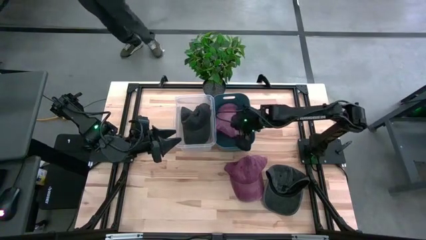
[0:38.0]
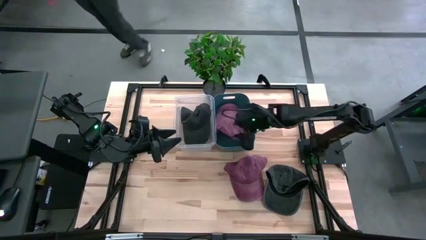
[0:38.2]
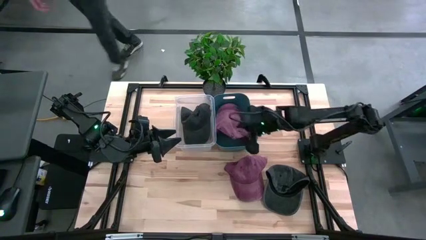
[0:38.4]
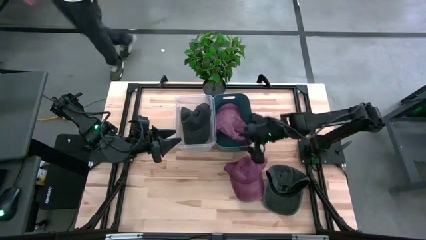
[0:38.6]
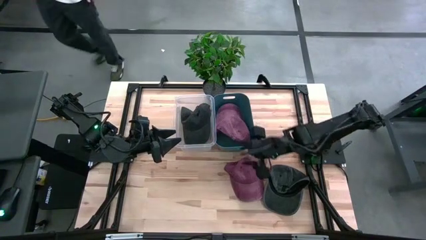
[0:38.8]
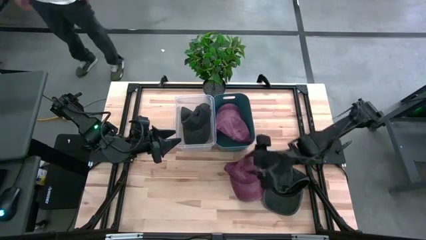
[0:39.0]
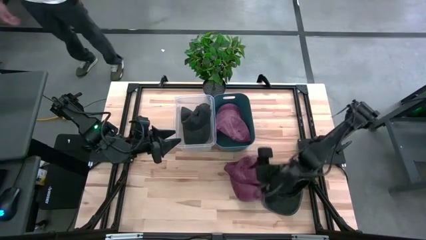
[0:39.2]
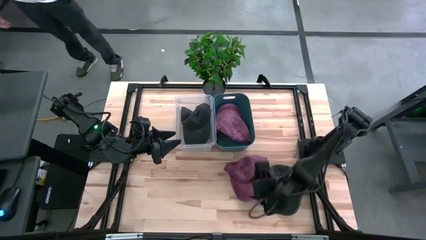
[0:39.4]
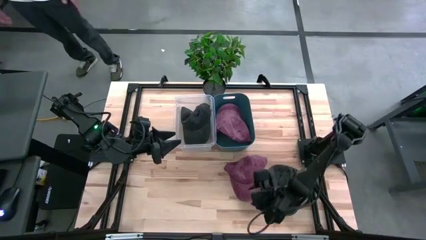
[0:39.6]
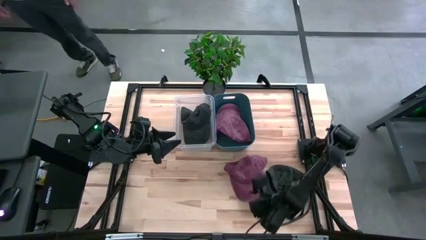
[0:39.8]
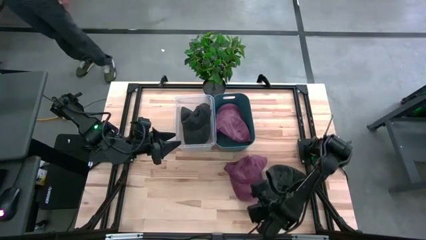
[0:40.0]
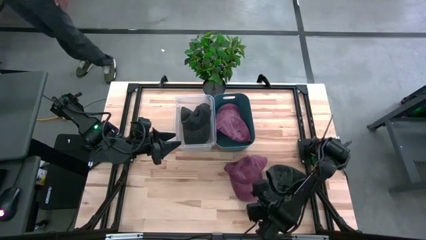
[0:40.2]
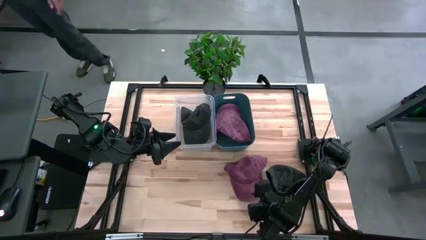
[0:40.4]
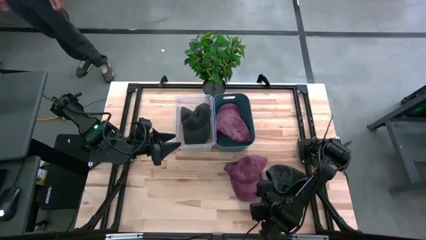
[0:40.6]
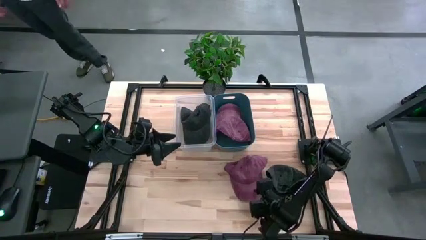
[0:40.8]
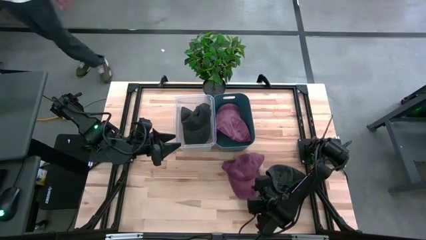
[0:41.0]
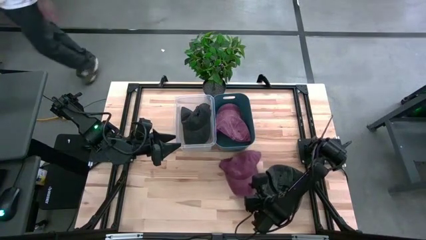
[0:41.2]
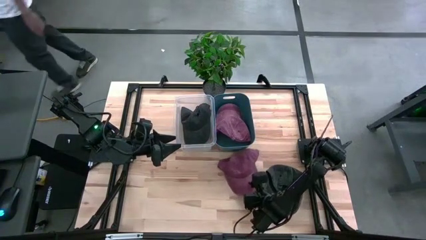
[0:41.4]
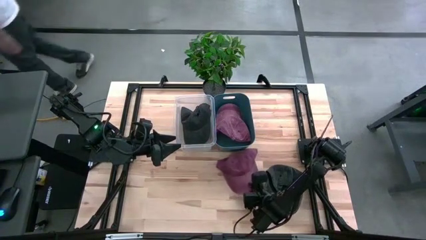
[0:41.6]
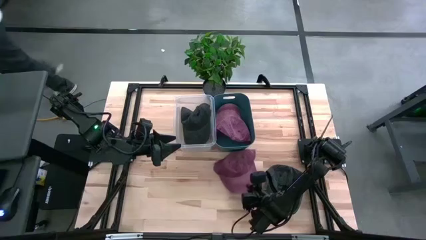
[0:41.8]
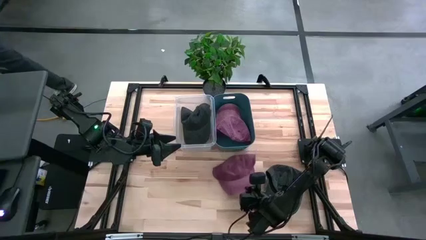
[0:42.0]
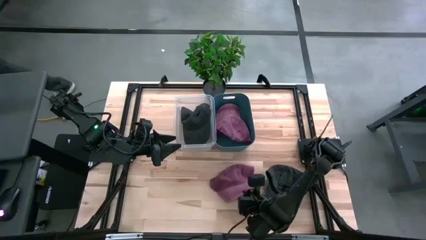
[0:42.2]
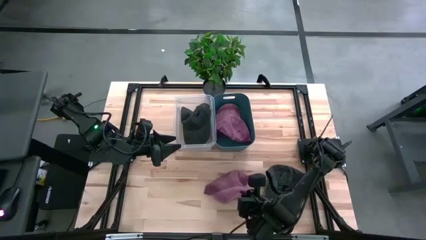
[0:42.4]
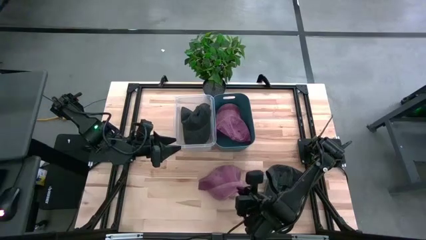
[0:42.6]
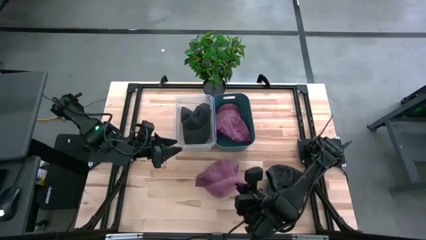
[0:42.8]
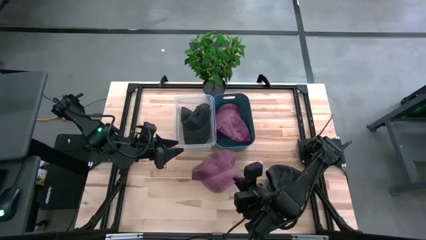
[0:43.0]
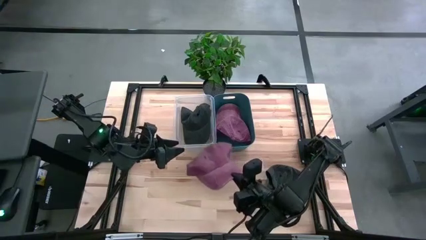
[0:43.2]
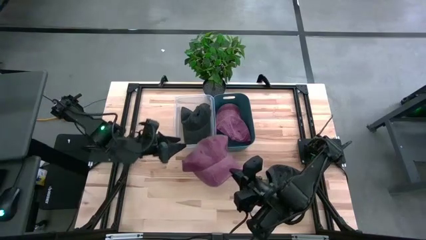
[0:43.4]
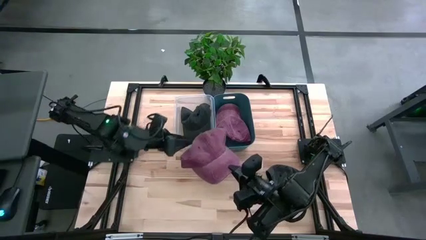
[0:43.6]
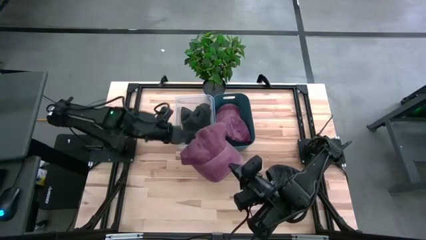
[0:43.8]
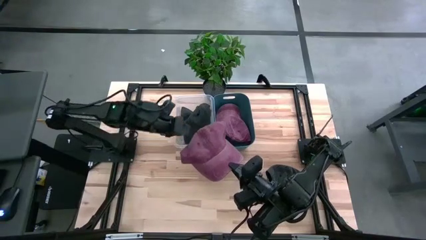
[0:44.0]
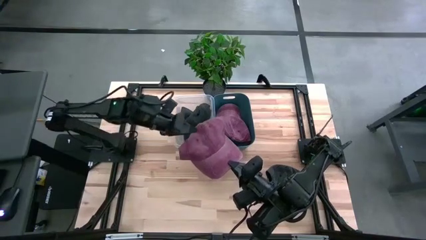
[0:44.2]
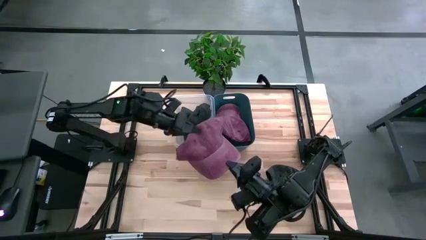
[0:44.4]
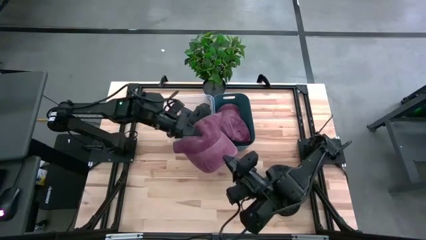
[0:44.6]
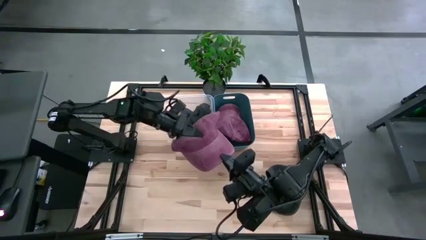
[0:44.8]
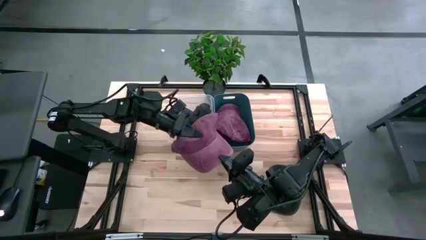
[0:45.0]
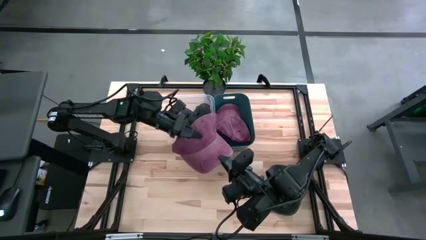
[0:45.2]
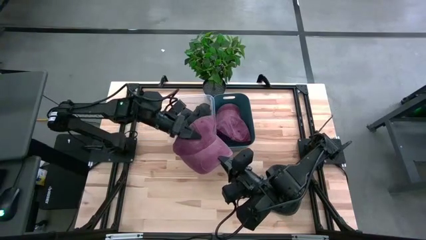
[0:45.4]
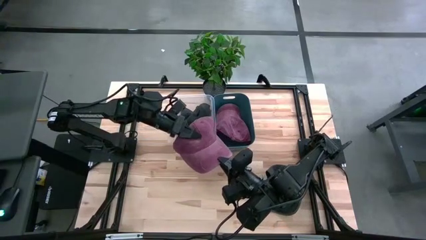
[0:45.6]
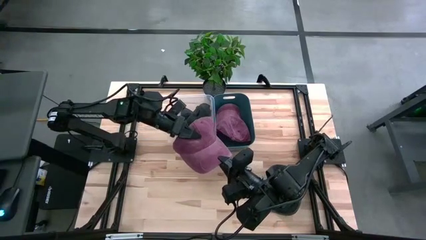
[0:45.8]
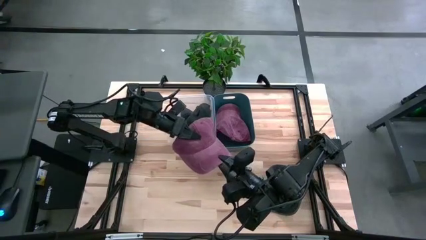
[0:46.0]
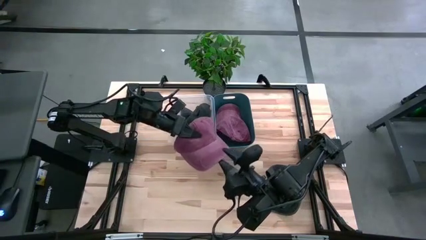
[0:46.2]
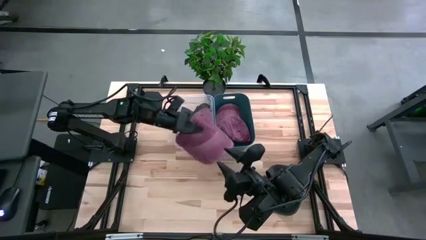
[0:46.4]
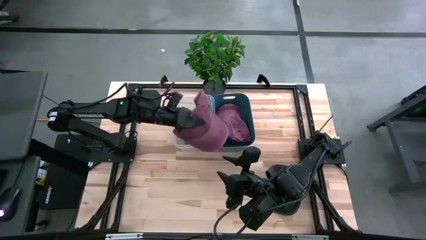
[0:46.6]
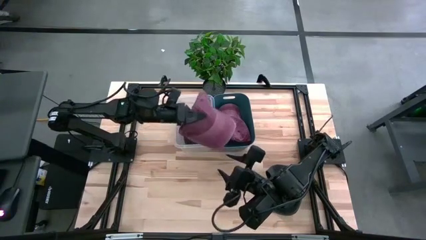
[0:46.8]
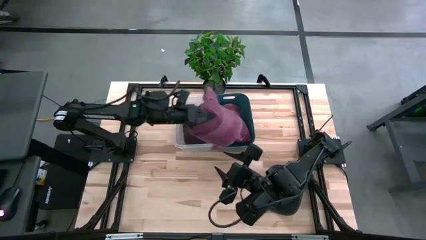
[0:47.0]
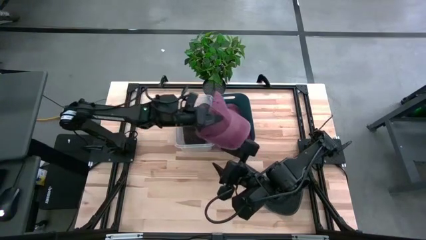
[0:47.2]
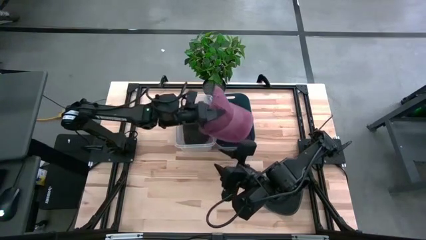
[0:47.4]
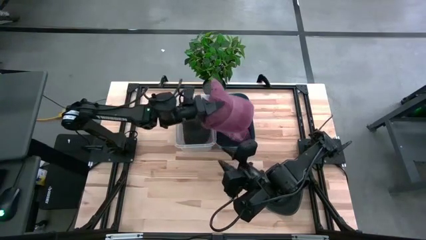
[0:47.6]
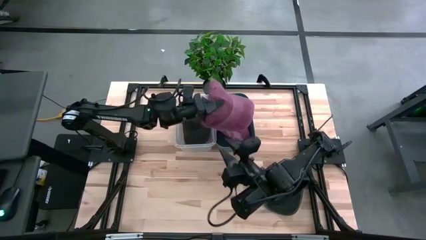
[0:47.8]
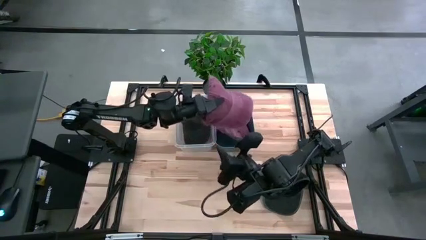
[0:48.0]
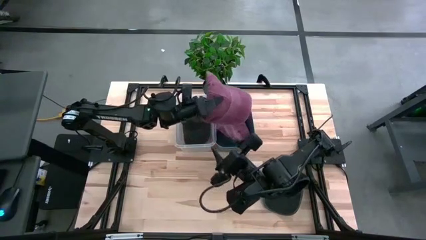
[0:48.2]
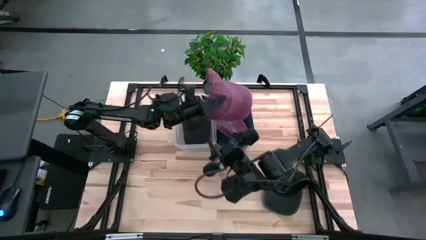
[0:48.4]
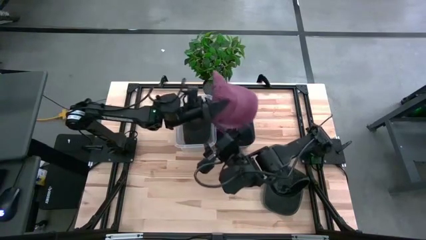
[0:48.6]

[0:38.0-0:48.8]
Task: Pick & Place hat
Put the red cap into the blue bin

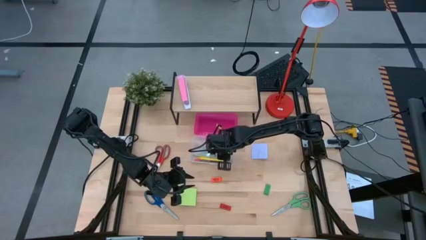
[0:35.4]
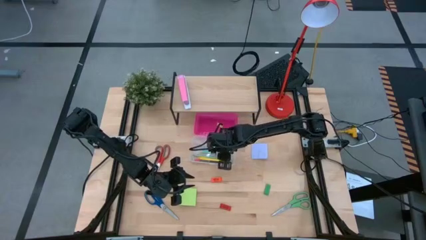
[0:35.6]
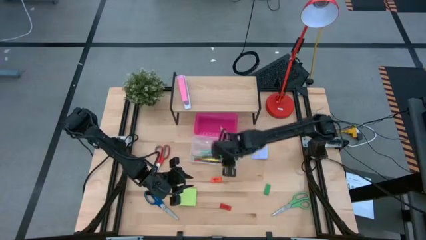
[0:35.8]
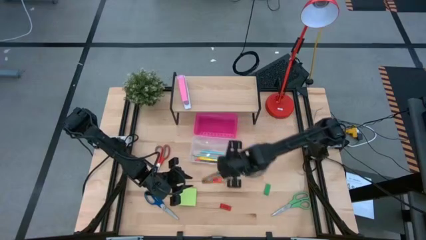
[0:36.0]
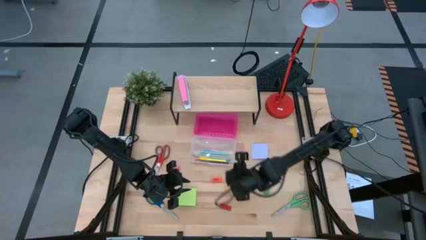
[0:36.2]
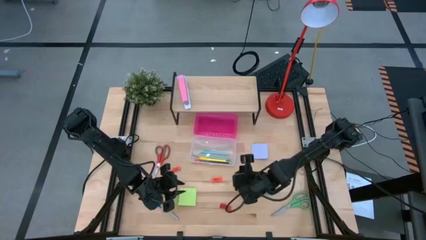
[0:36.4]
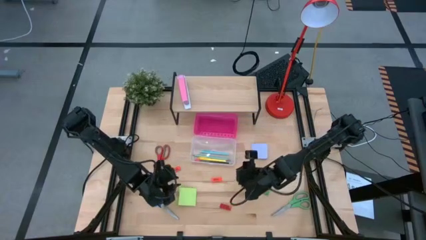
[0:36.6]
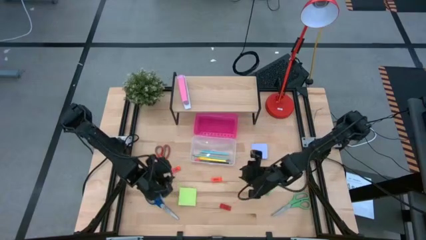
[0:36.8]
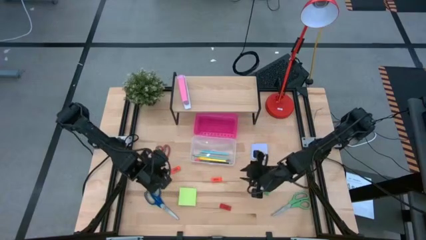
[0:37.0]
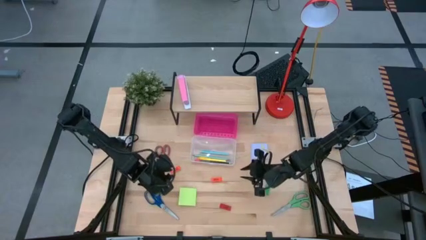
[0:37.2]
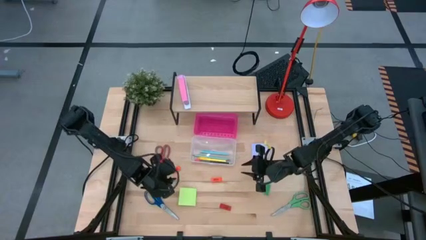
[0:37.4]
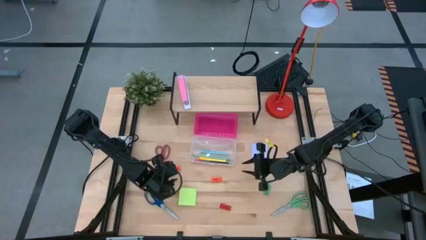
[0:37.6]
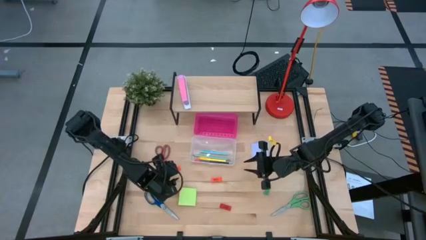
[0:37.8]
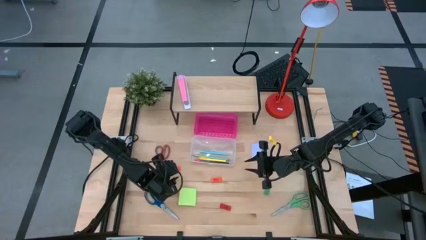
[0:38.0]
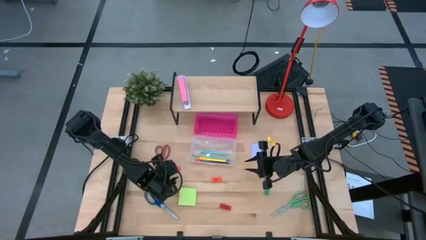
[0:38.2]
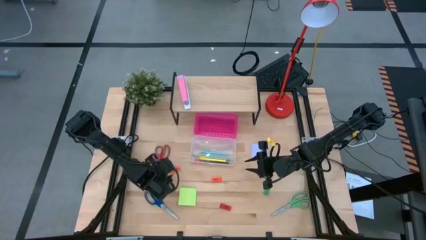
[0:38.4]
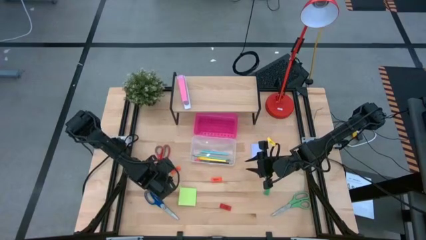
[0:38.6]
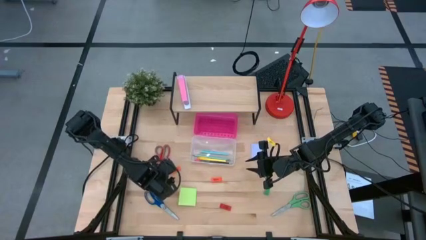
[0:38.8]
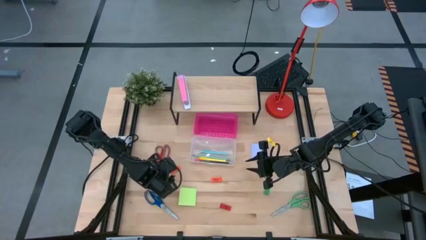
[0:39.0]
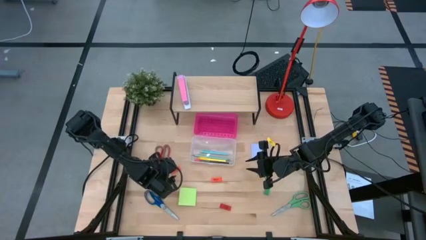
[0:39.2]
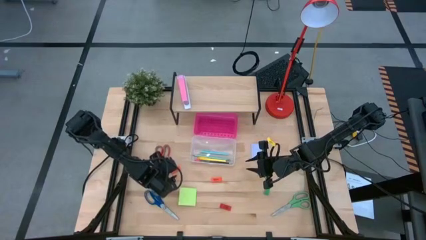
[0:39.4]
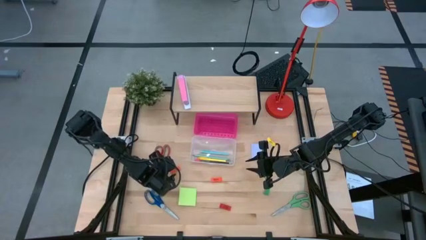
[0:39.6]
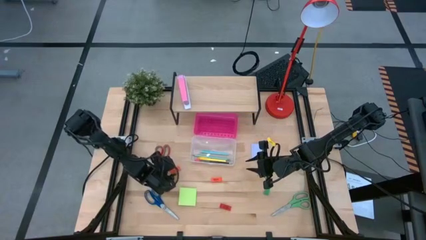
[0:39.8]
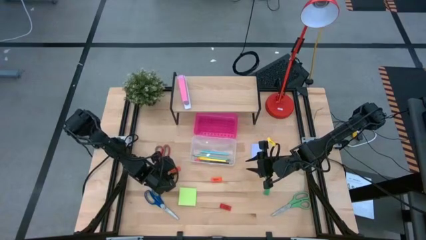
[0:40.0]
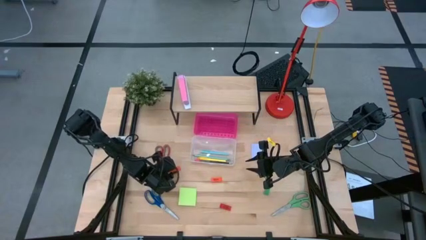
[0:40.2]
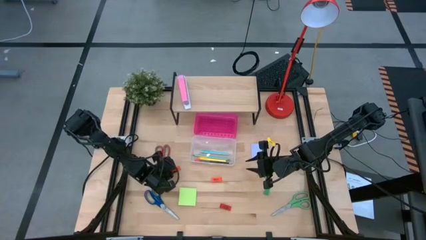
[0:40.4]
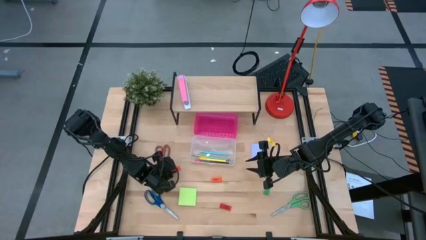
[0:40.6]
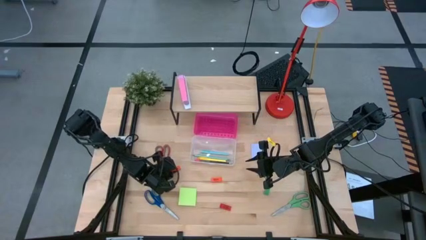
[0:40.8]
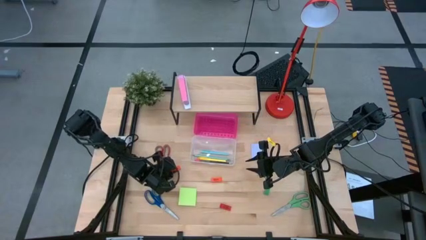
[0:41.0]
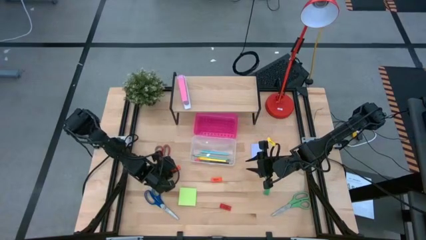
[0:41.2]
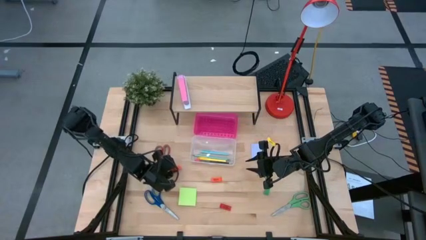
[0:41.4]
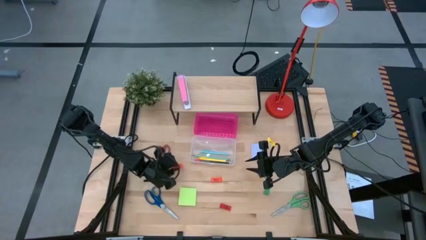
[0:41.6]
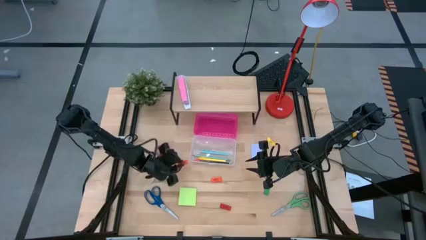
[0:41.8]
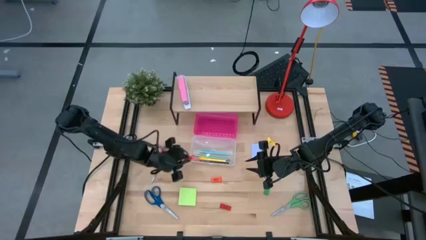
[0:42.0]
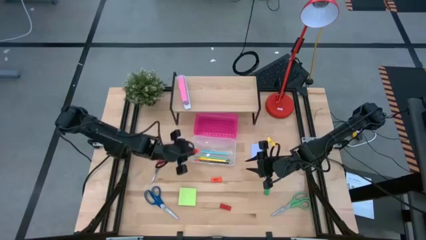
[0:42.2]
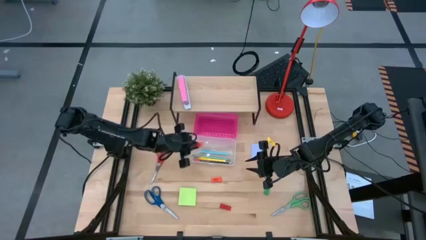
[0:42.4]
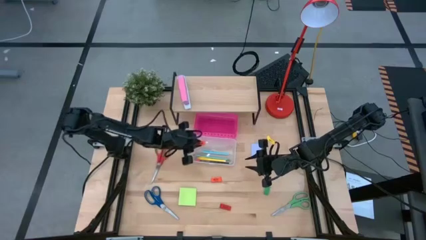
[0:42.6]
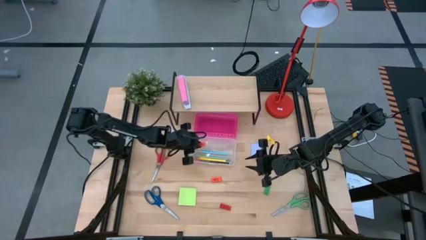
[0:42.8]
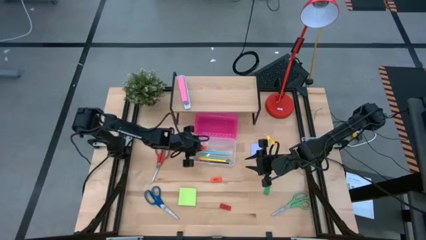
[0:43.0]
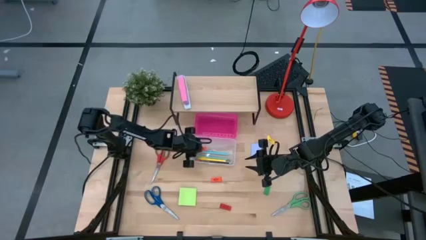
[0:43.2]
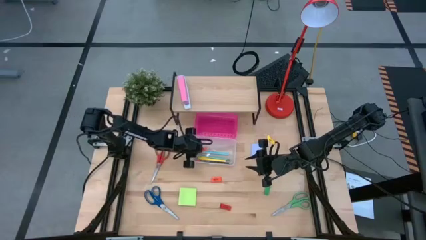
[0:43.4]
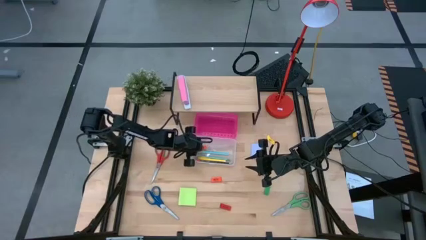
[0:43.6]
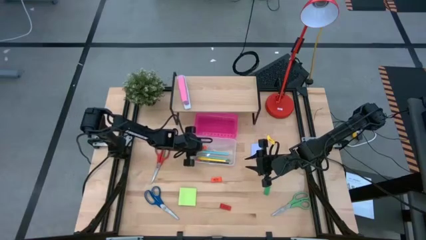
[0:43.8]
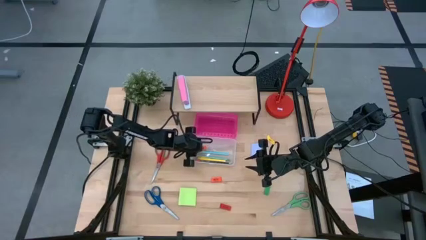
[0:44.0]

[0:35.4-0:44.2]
Task: Pack school essentials
Put the left orange eraser into the supply box
